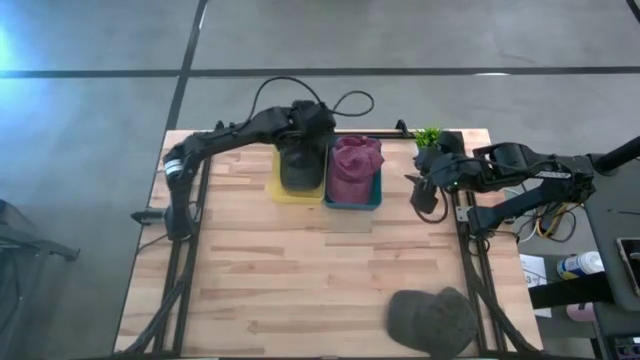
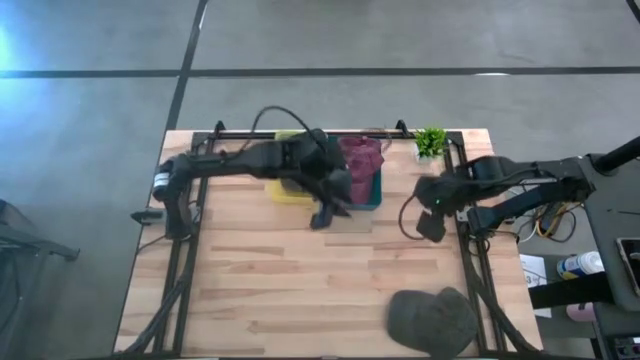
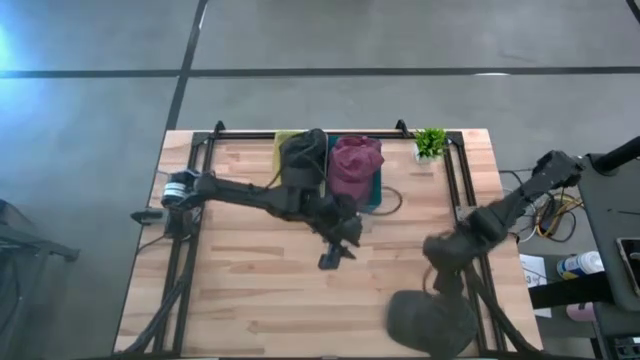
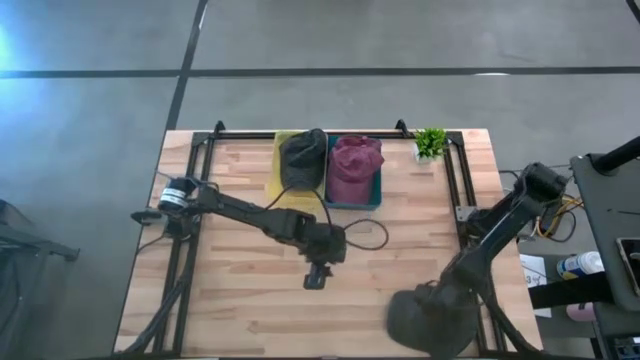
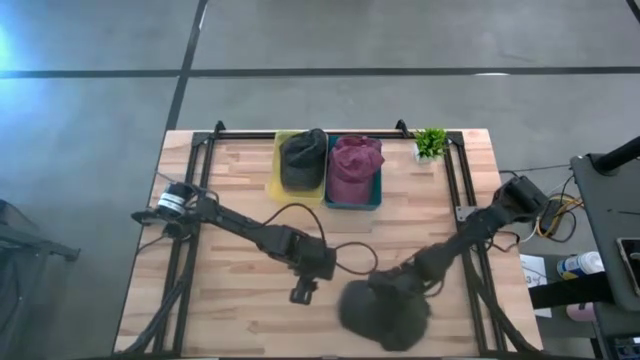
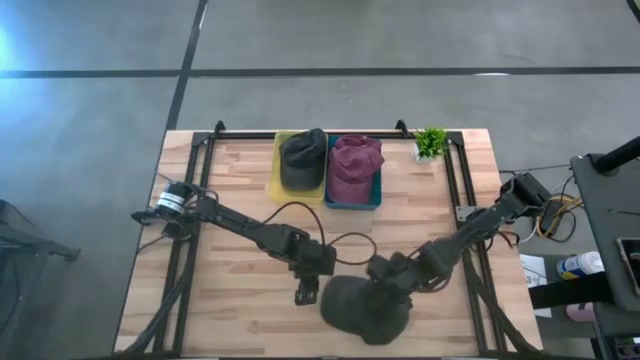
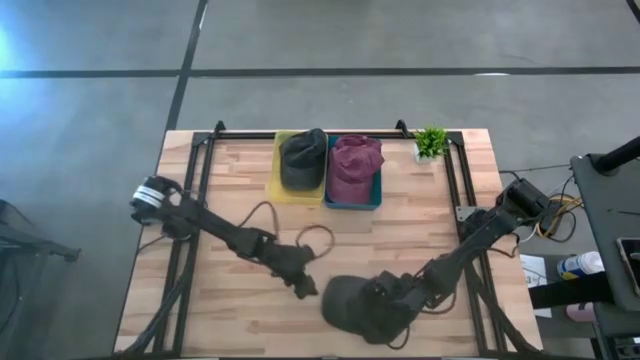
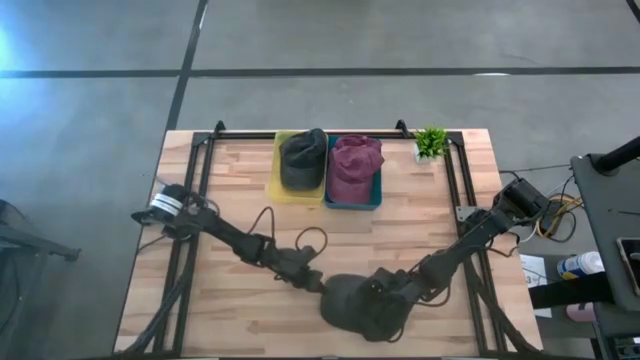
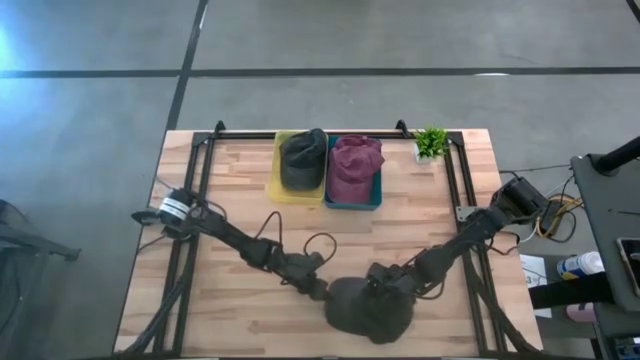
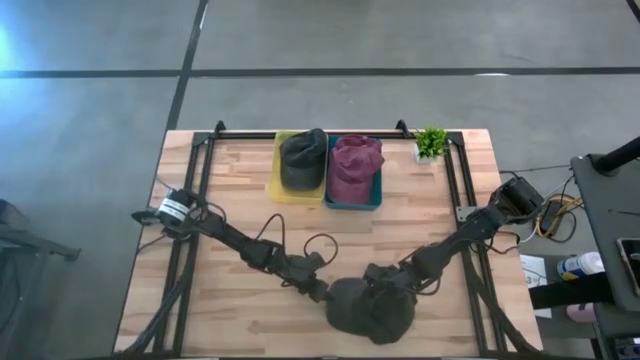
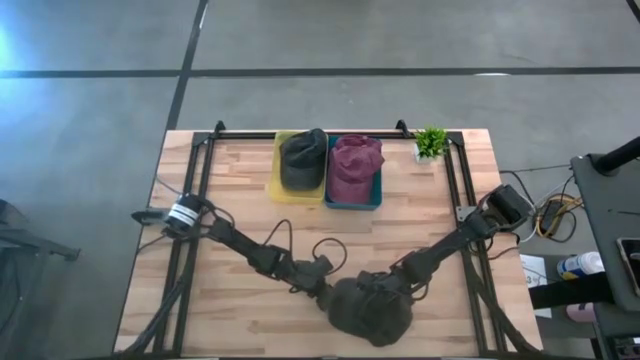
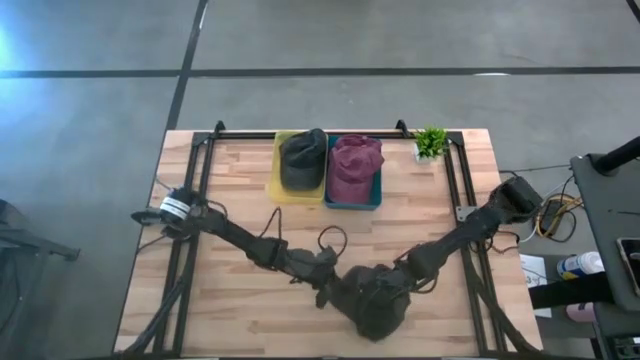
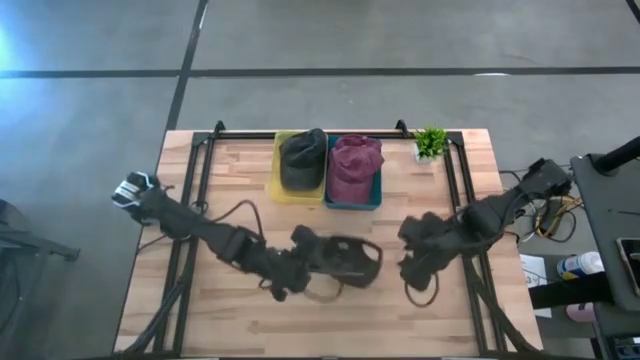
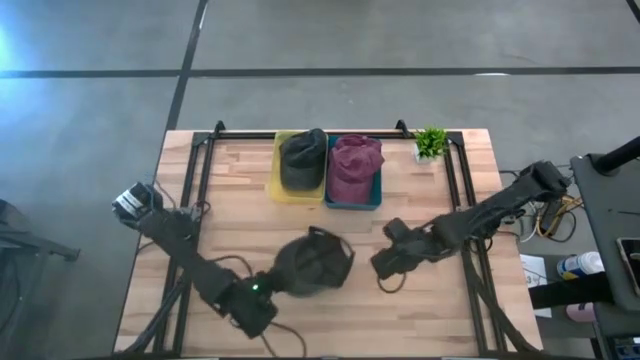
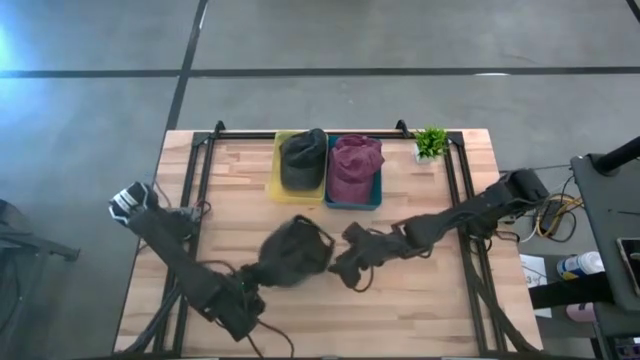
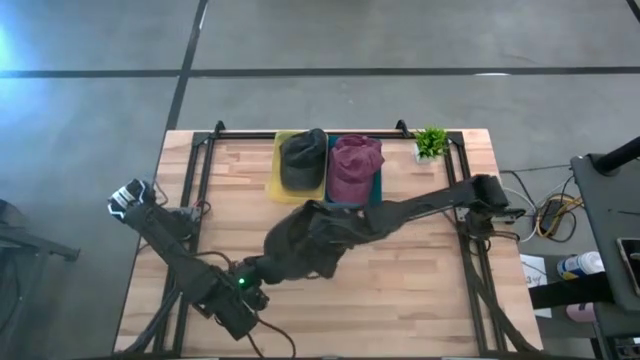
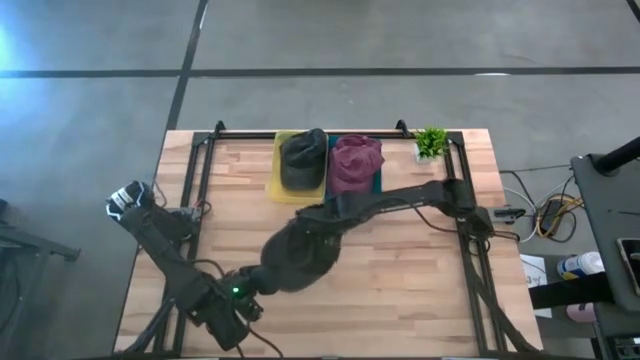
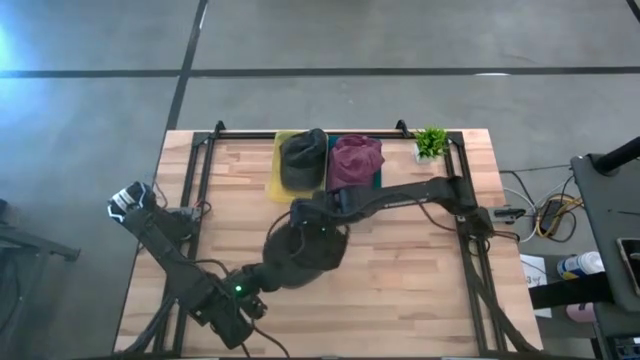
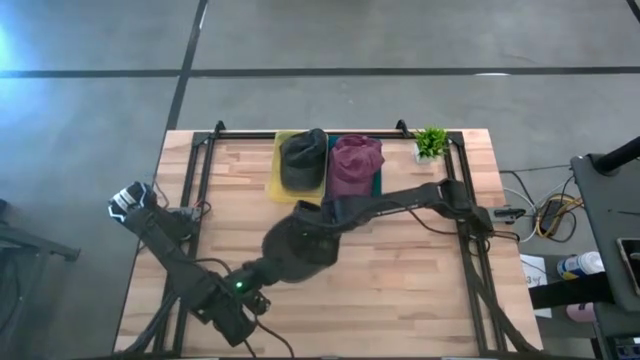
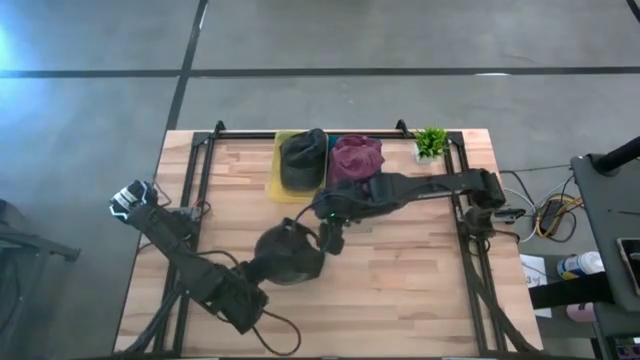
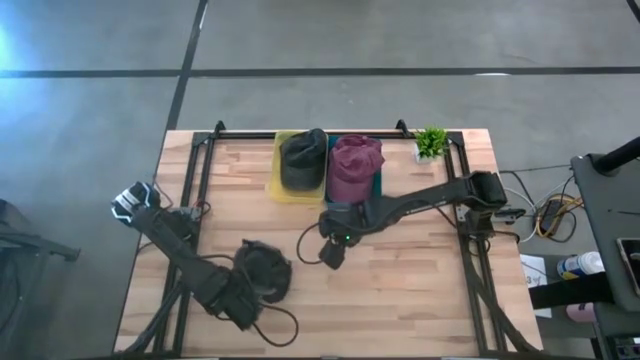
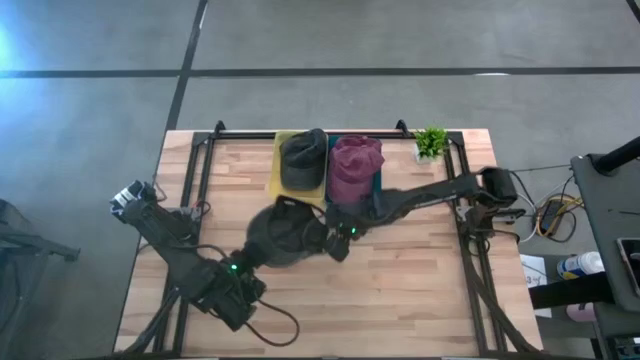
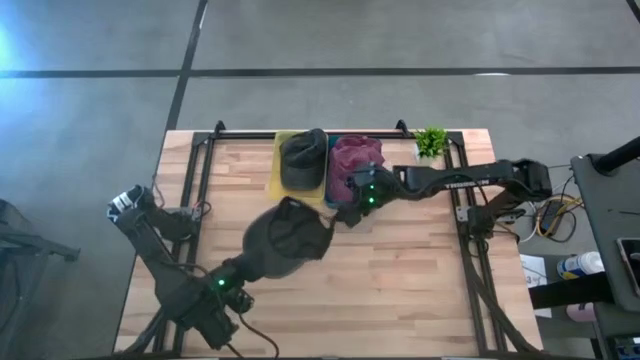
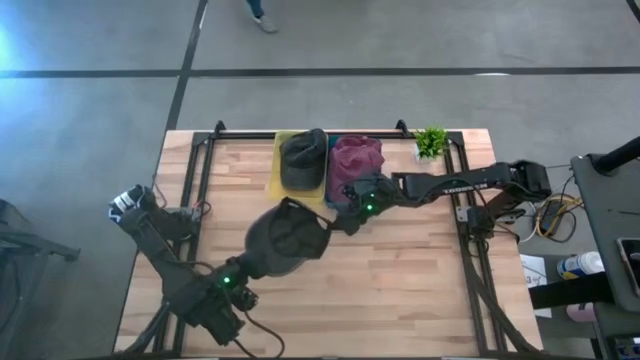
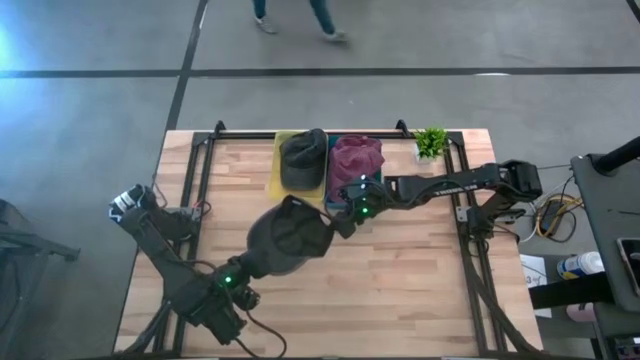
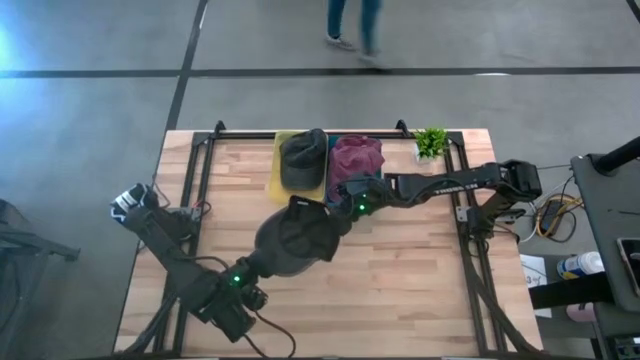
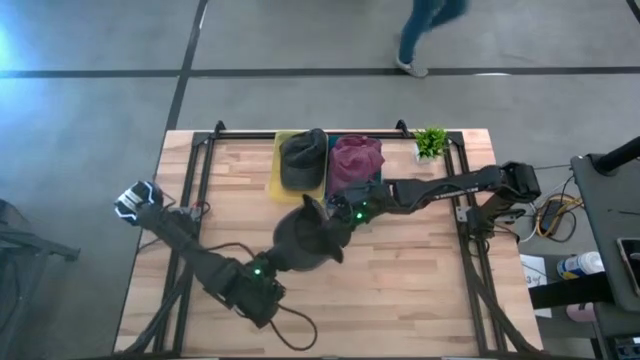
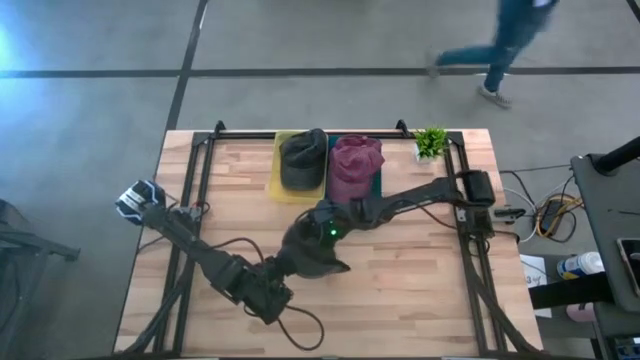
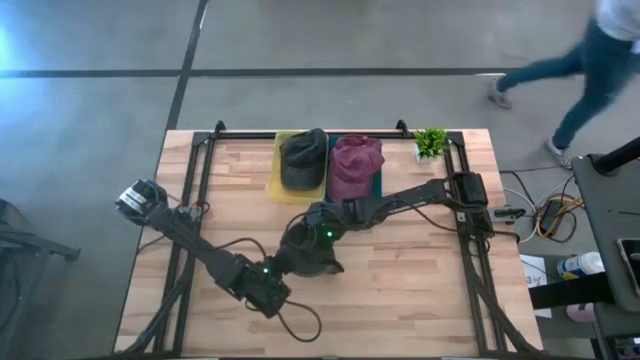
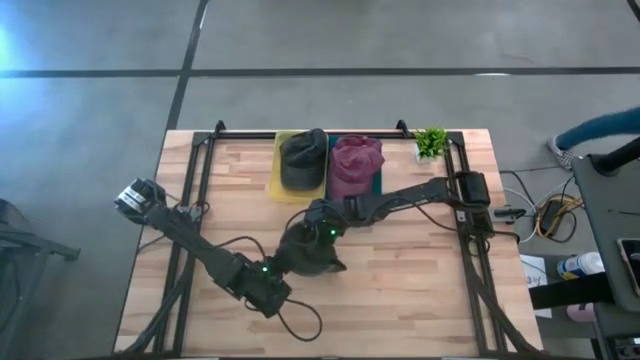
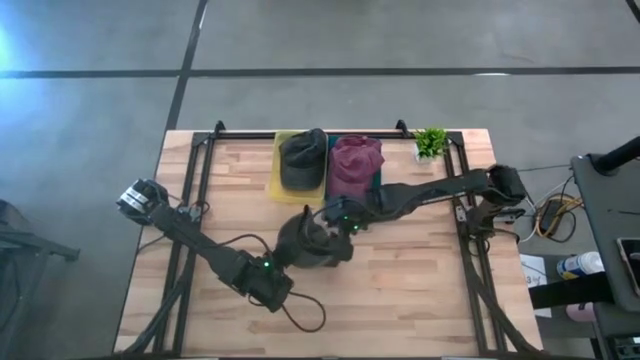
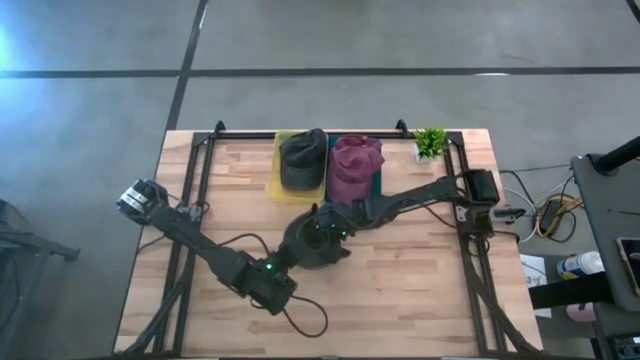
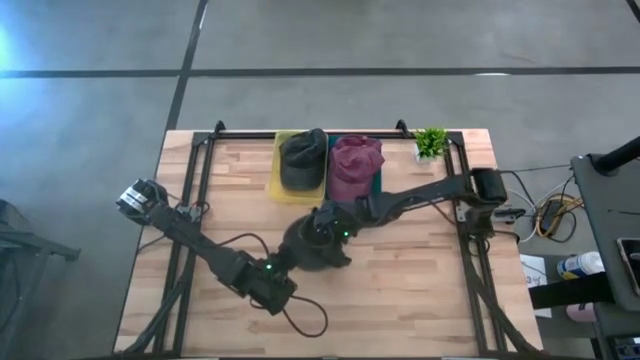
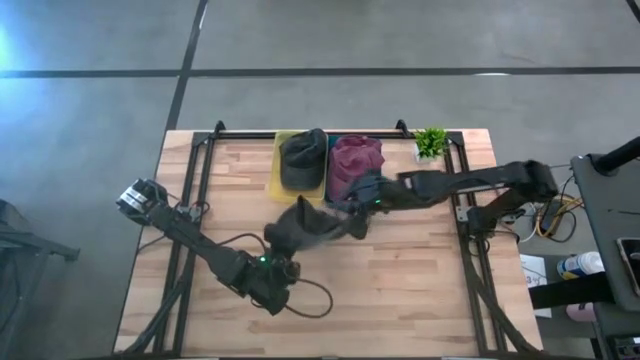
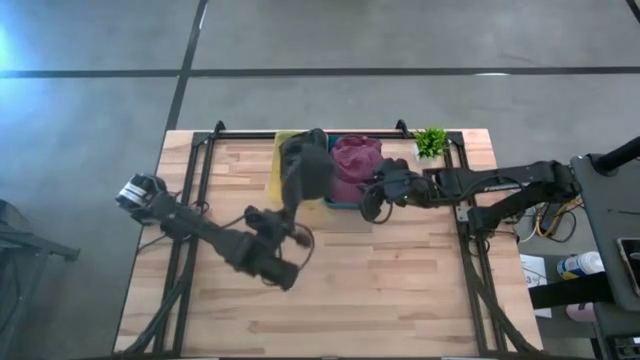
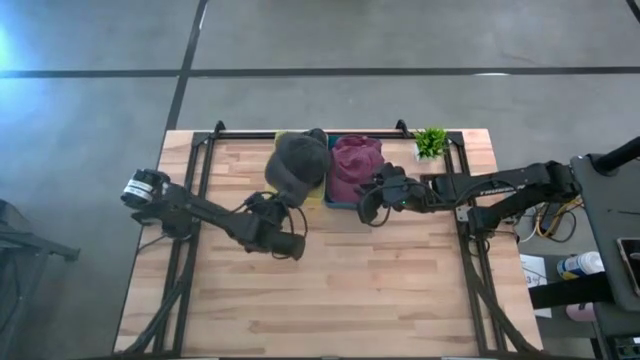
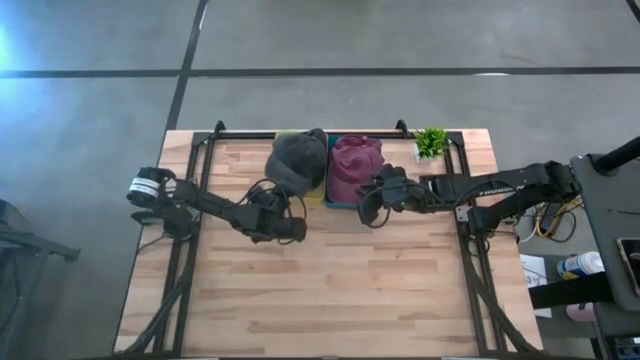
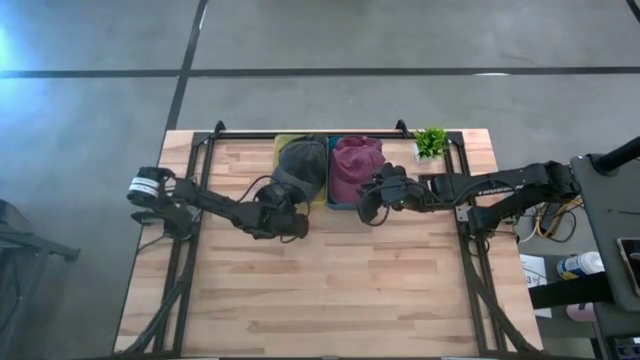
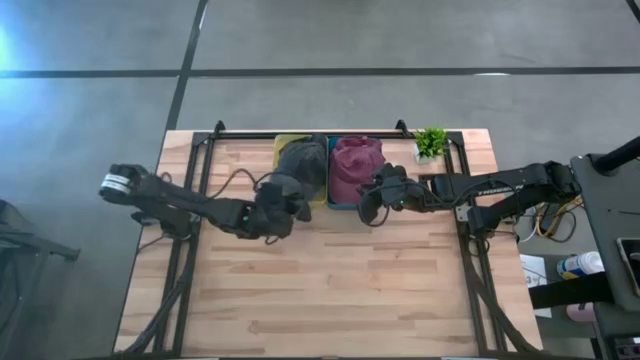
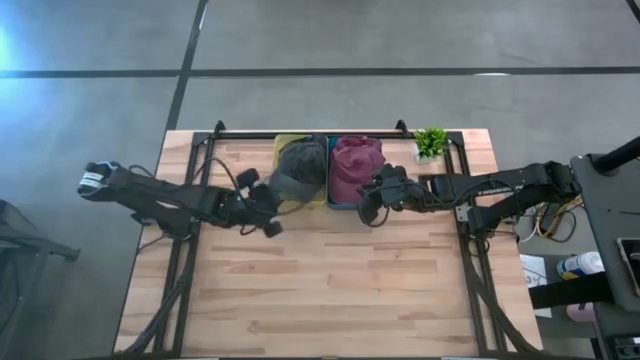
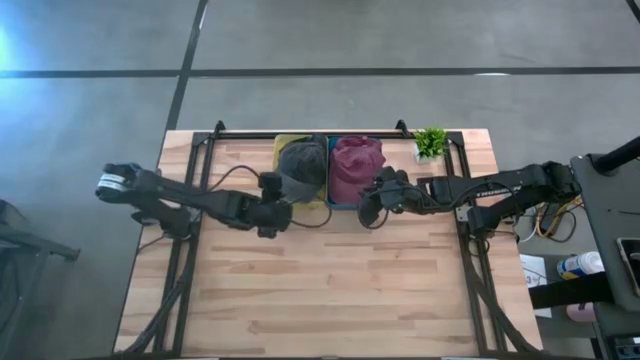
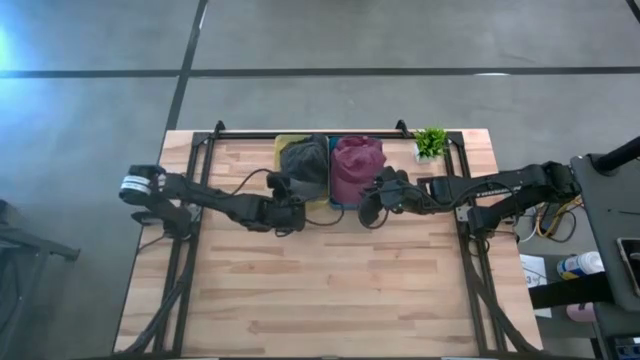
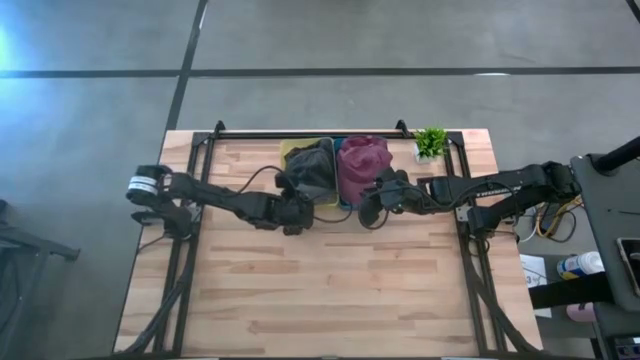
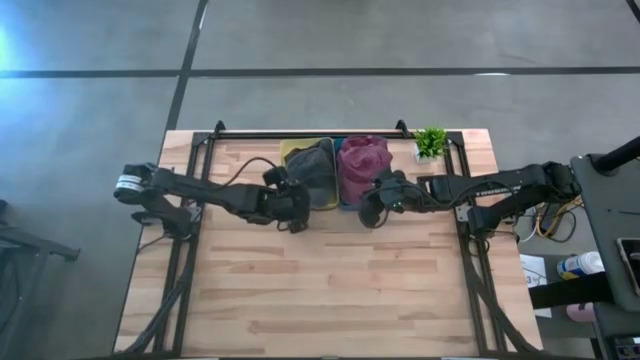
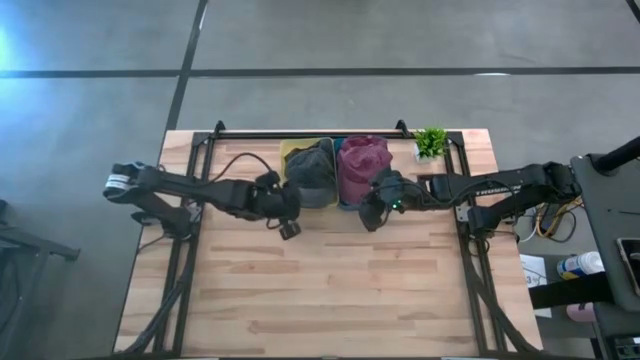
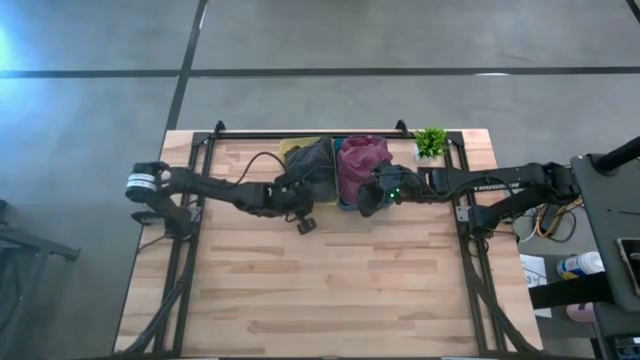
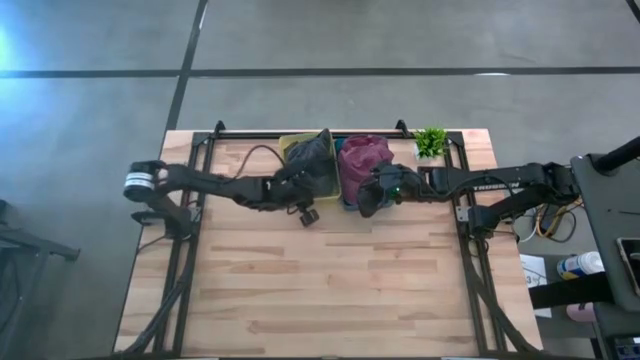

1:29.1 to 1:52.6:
Task: Sort caps
Put the black cap into the yellow bin
